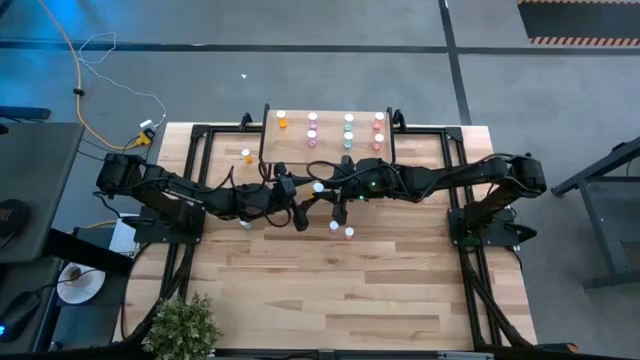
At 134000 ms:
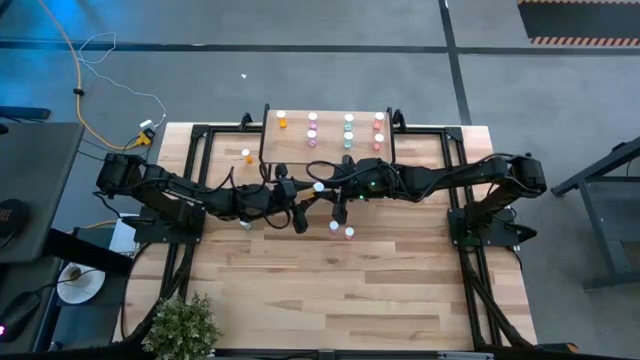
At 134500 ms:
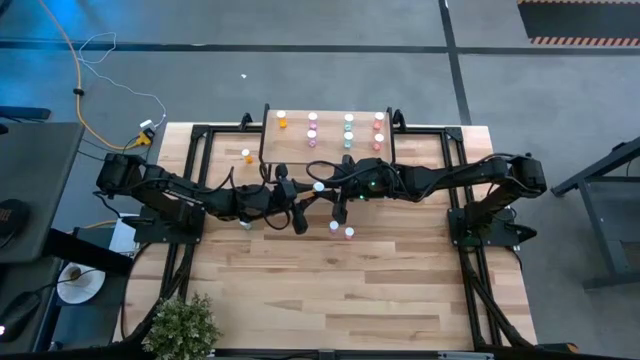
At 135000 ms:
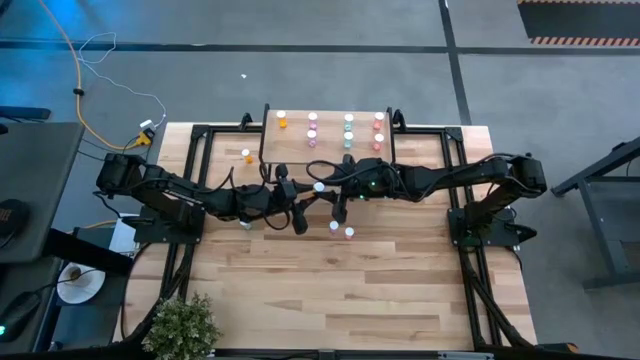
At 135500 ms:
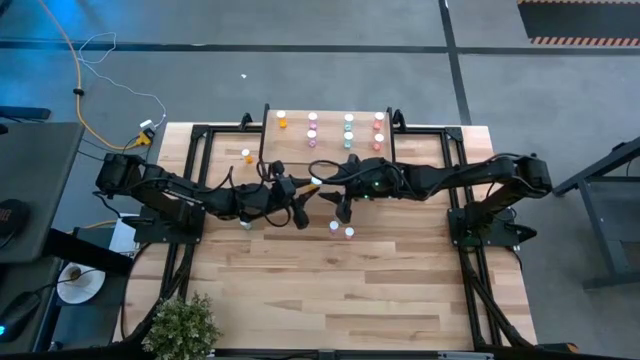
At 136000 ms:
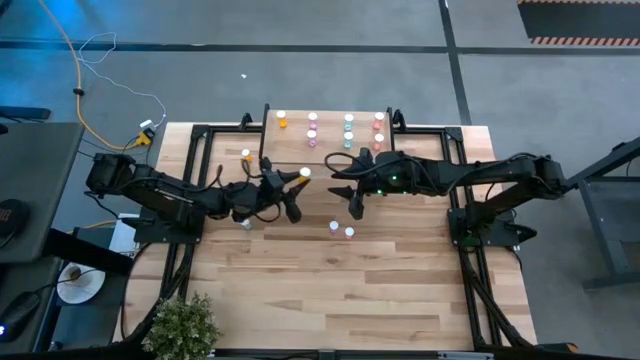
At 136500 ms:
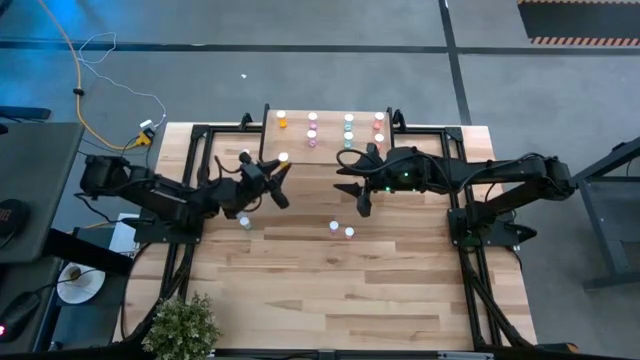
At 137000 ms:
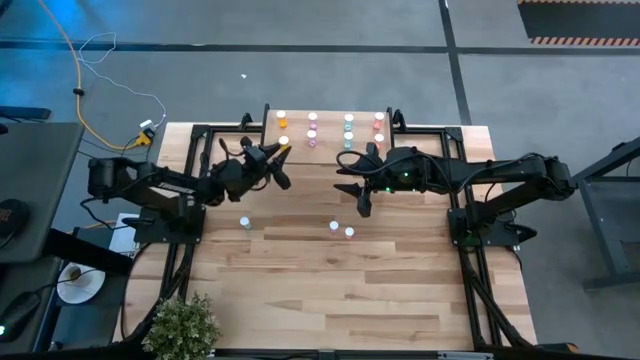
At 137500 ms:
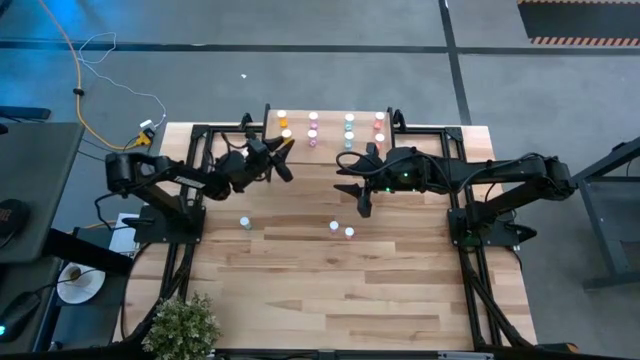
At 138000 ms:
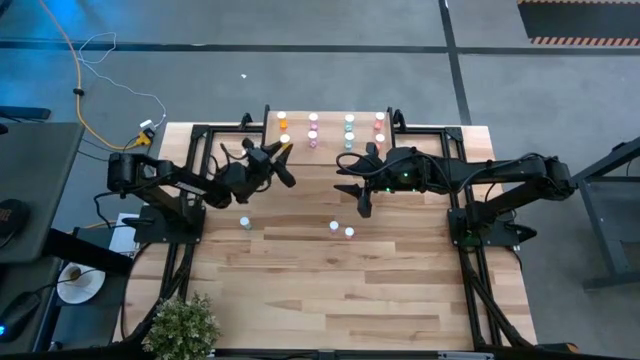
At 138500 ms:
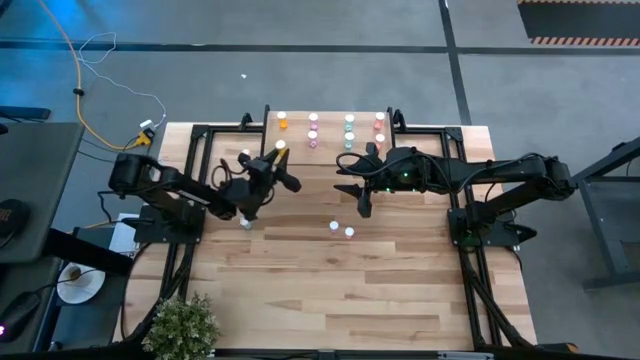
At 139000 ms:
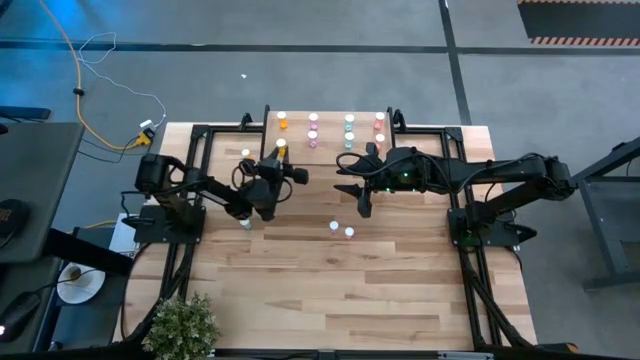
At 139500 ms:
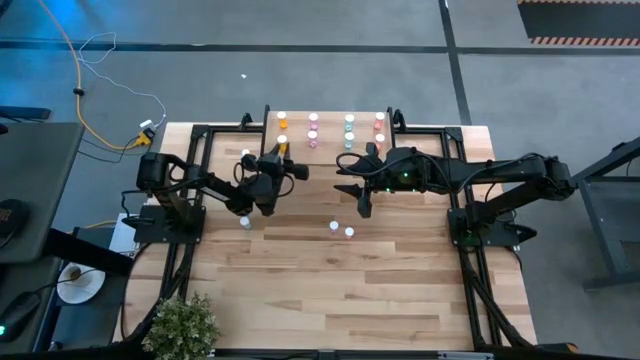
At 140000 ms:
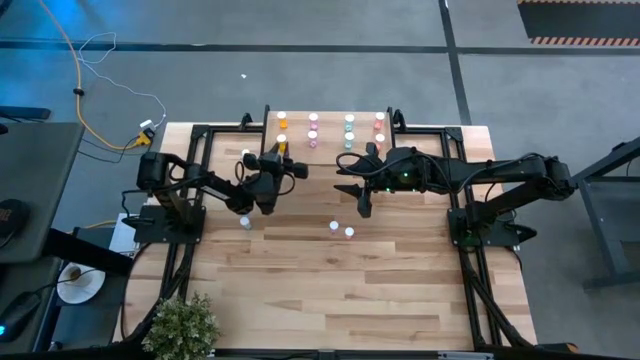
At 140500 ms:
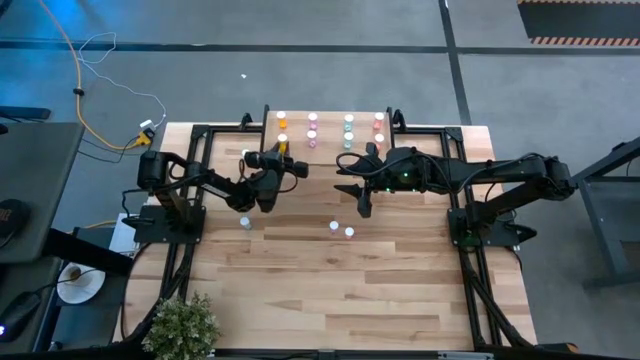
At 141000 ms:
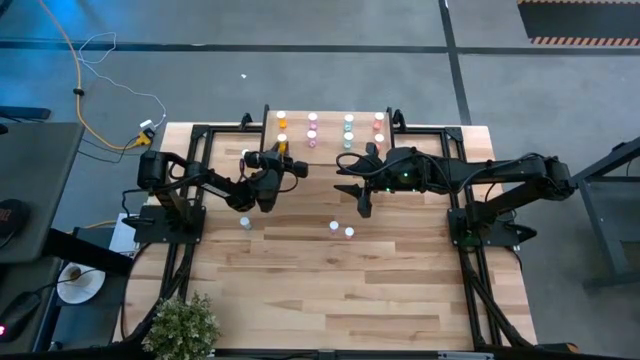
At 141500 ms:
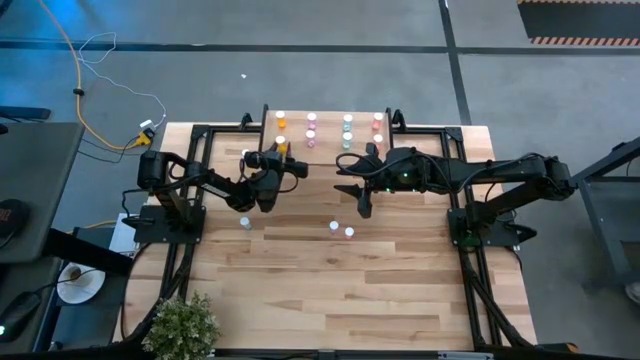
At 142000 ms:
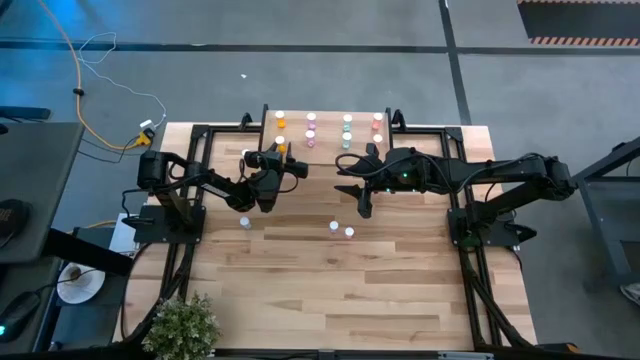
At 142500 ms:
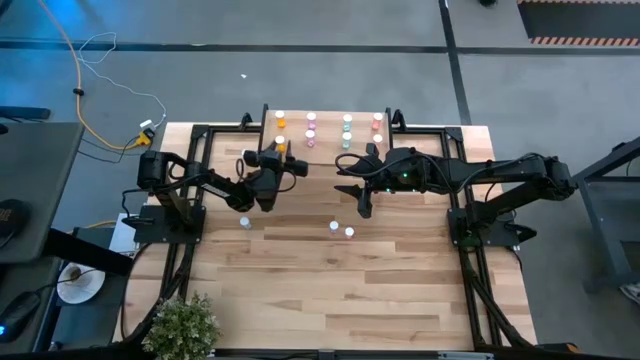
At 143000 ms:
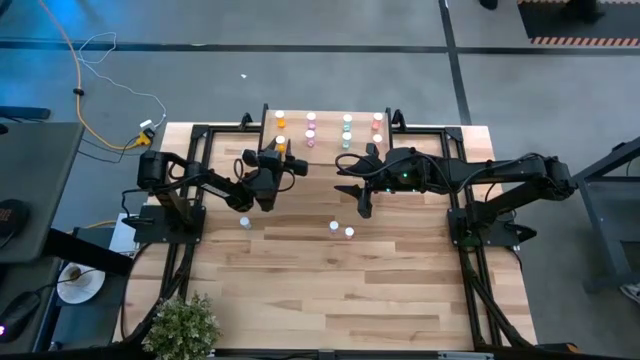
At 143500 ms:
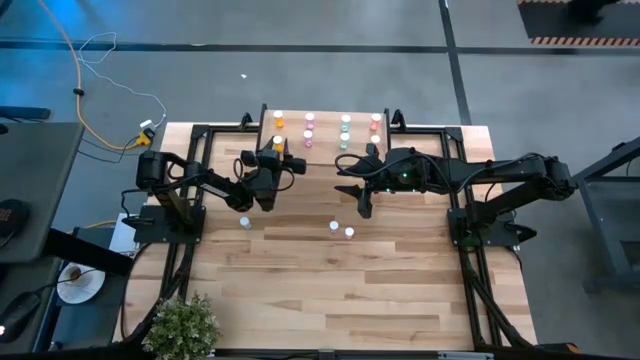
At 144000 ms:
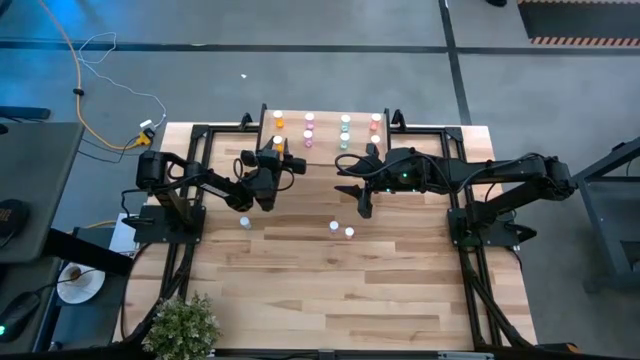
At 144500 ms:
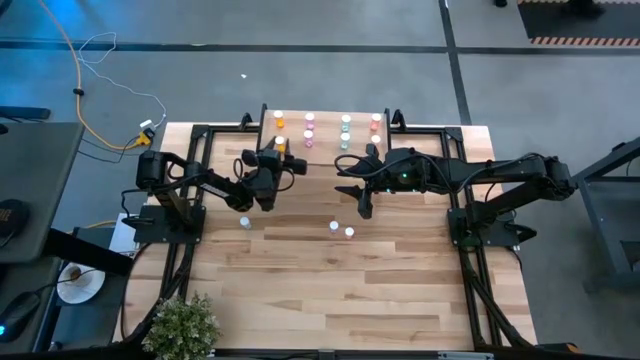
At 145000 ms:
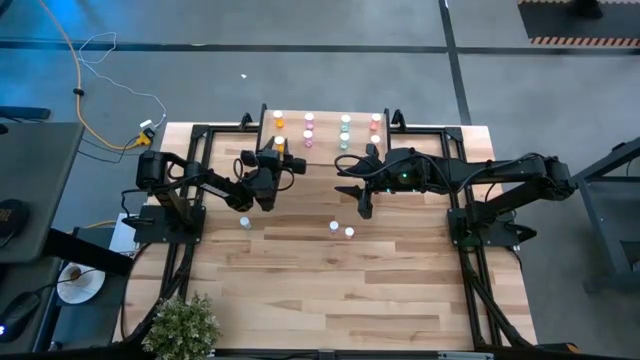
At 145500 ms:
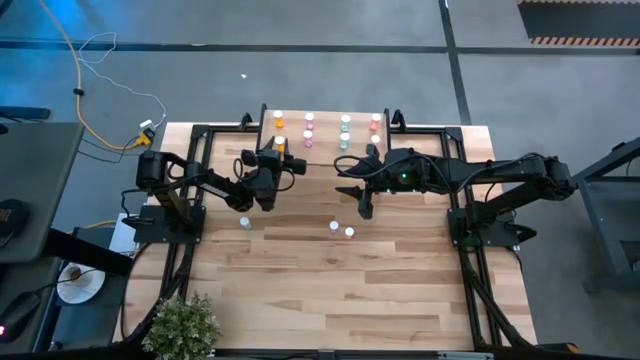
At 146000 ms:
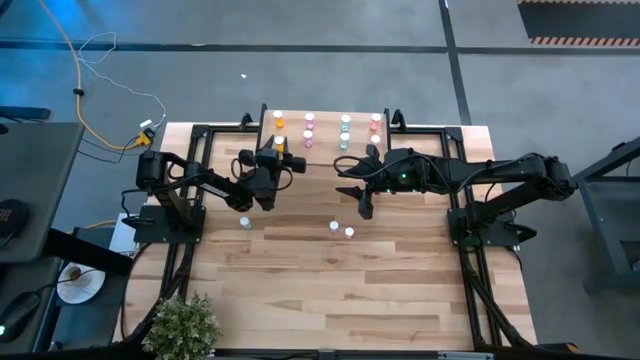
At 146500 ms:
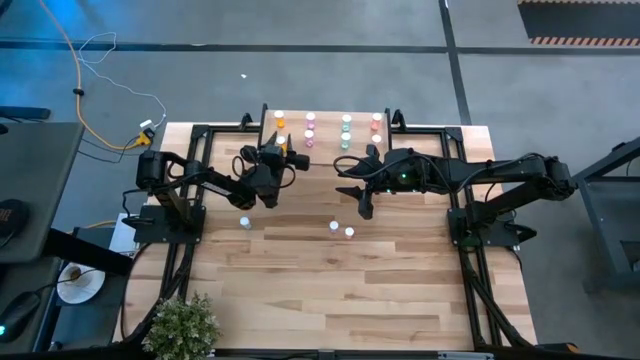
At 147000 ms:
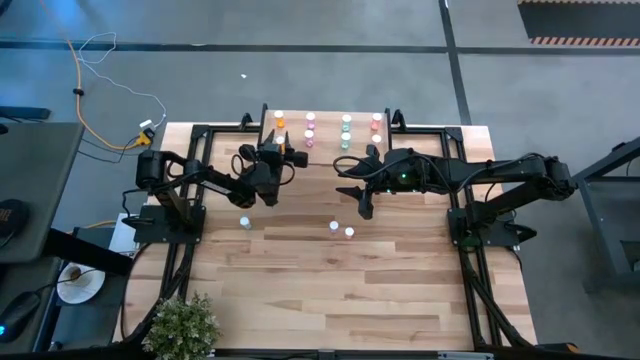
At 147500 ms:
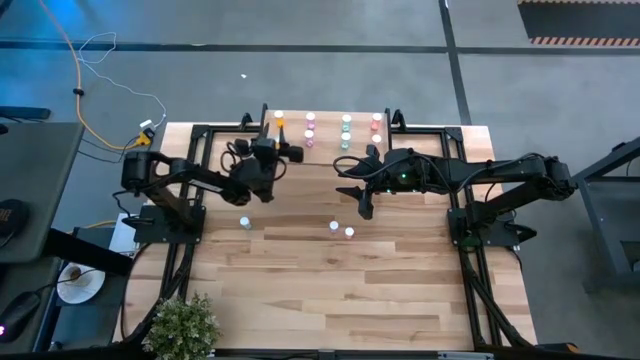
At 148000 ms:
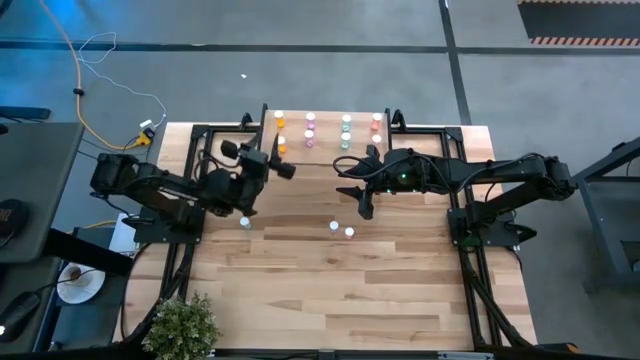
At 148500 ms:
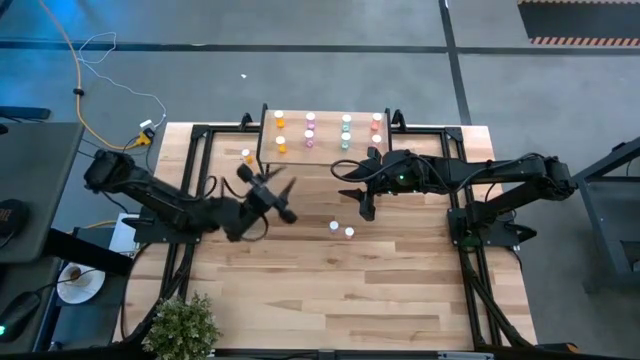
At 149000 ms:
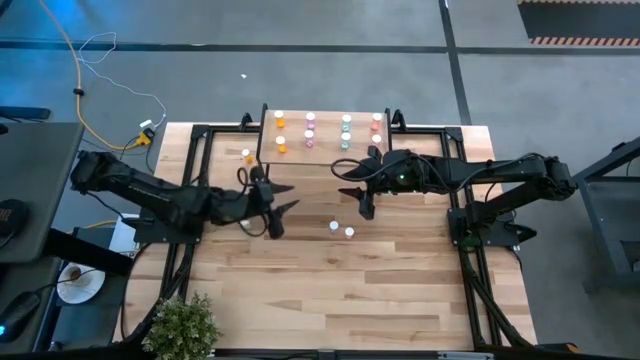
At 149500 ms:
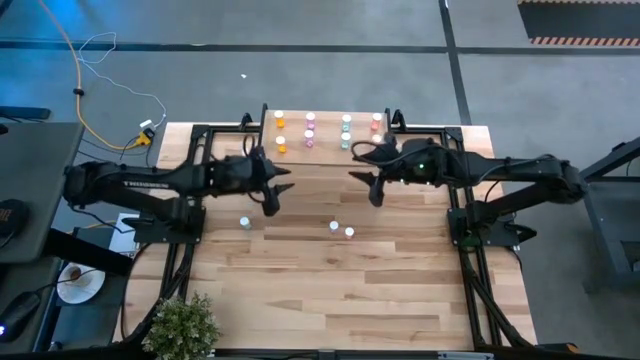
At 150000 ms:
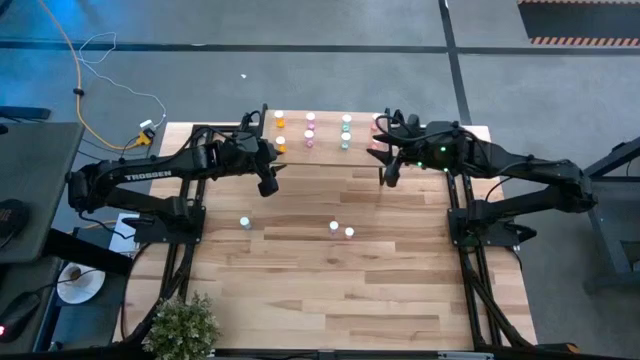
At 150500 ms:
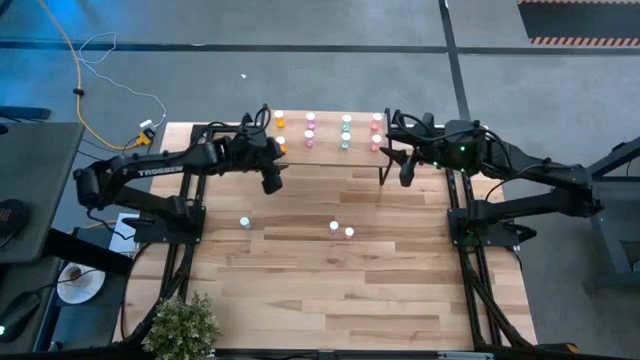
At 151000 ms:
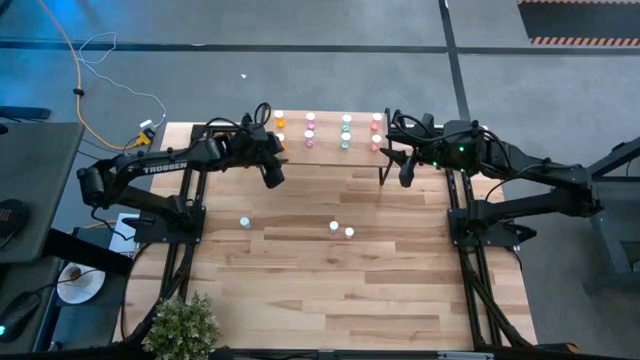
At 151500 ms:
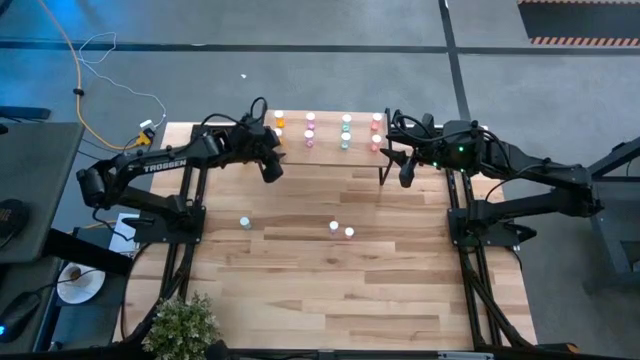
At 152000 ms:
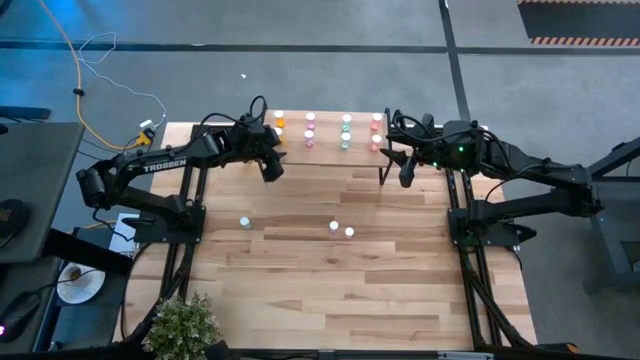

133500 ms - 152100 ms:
Task: Pick and place medicine bottles onto shelf by color
Put the bottom orange pill bottle on the shelf aligned with the other orange pill bottle

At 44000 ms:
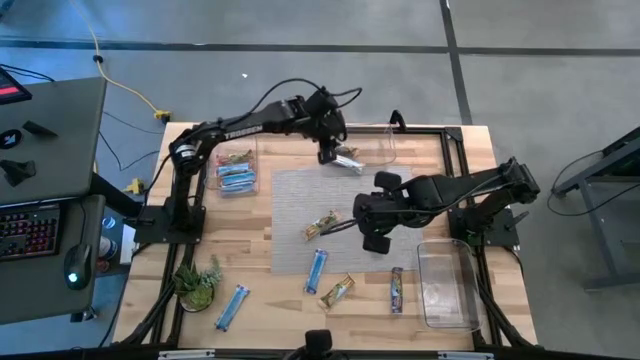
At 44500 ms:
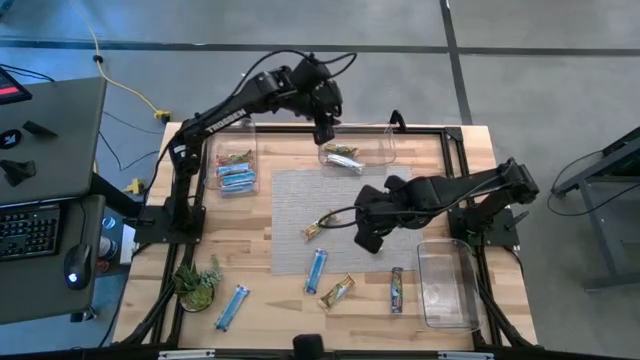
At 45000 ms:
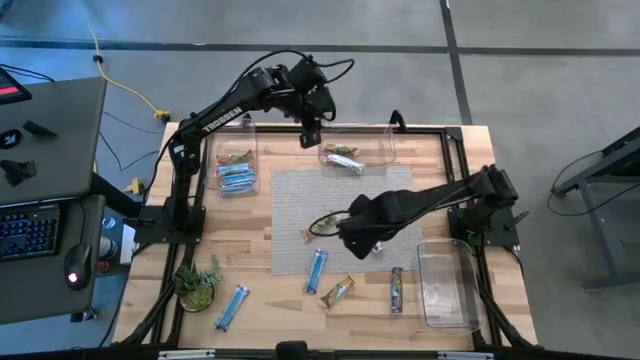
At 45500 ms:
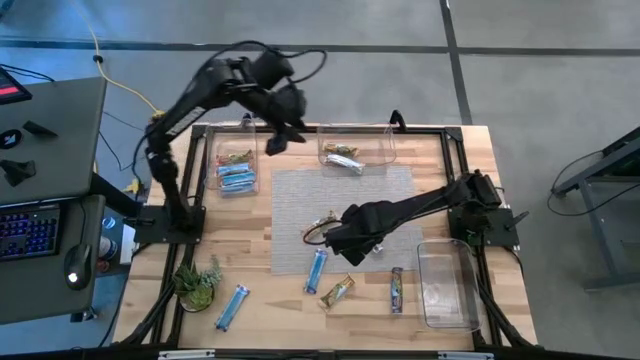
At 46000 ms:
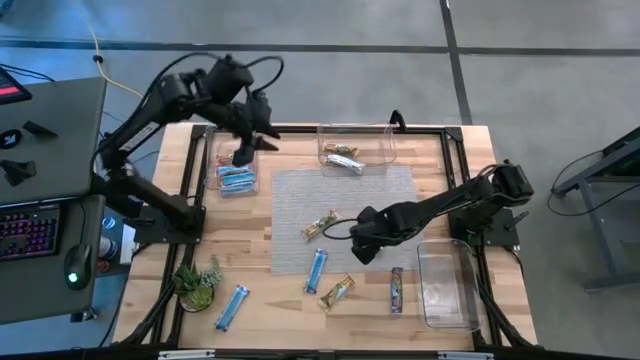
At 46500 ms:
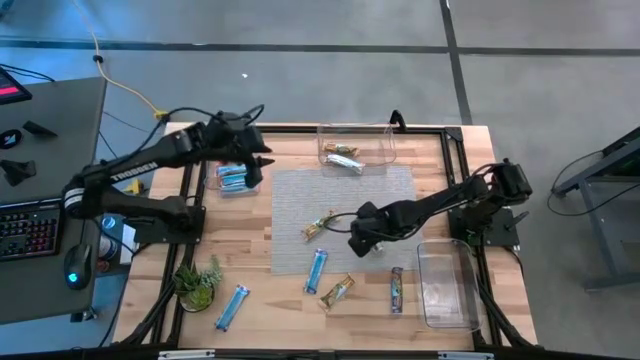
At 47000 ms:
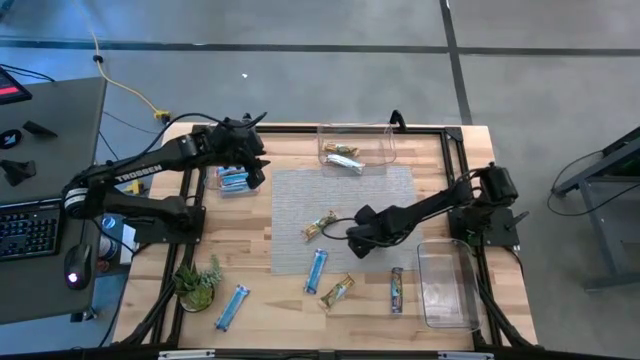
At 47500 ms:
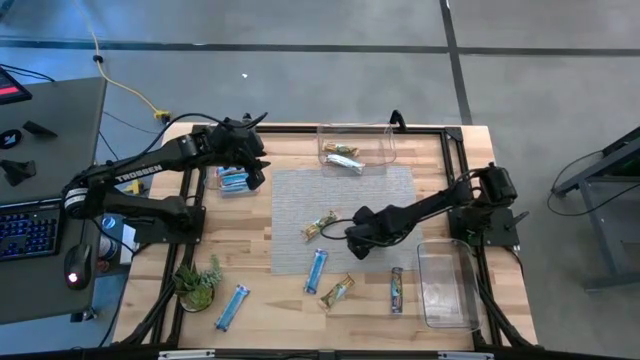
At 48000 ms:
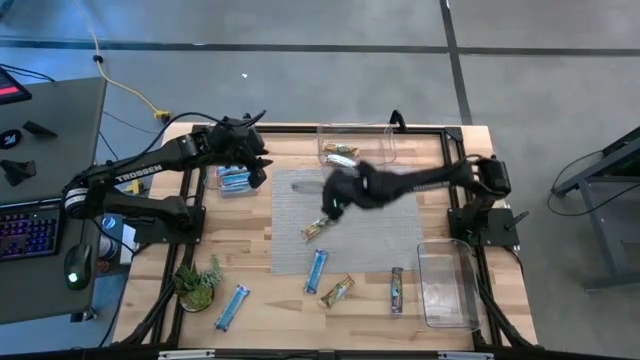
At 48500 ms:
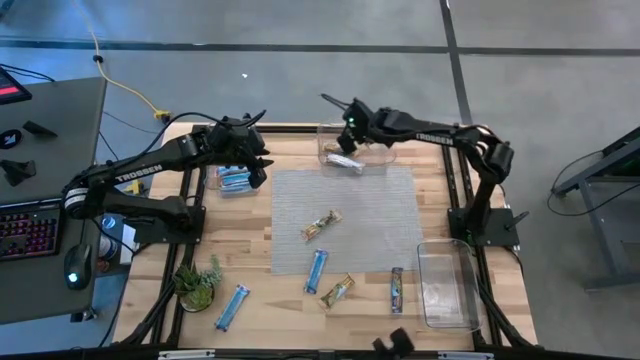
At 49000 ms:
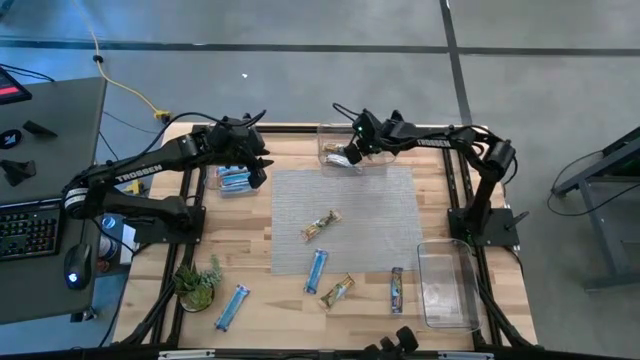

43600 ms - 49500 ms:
Task: Pick and place Granola Bars by type
Put the yellow granola bar into the top right transparent bin
